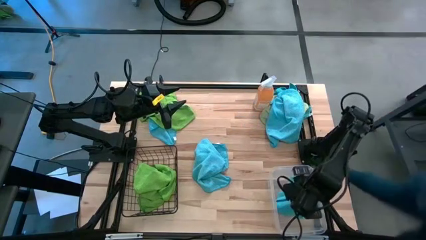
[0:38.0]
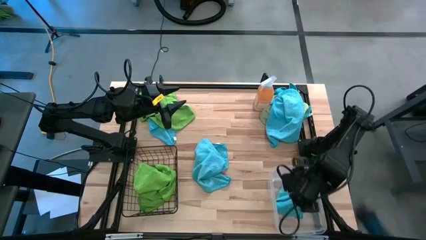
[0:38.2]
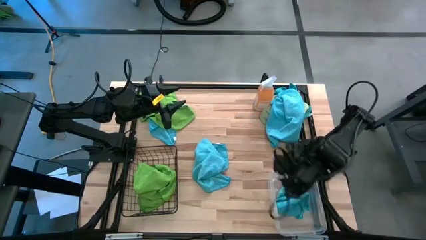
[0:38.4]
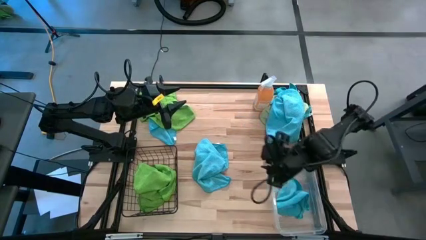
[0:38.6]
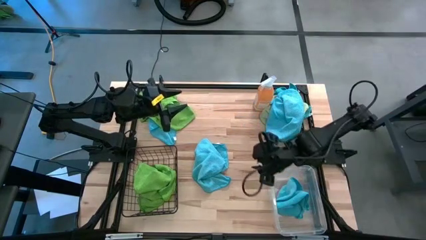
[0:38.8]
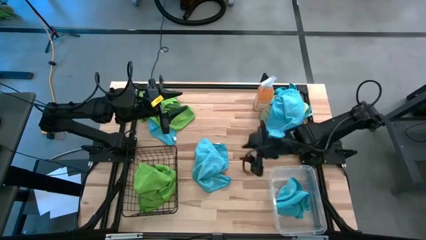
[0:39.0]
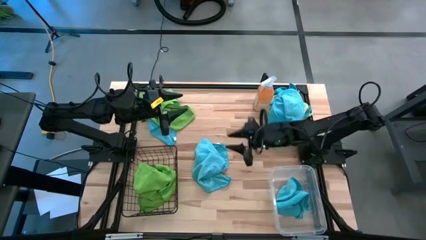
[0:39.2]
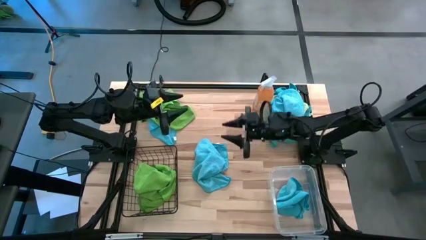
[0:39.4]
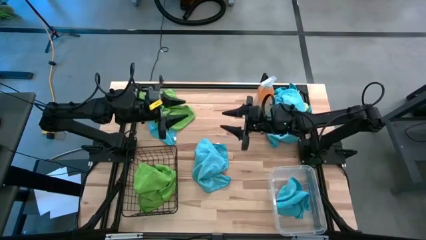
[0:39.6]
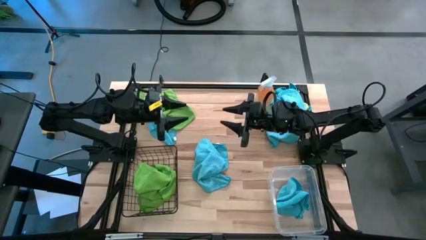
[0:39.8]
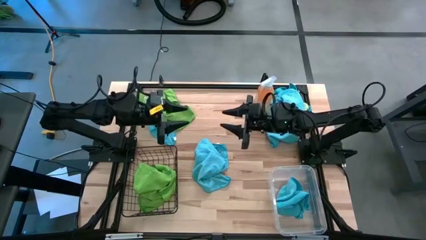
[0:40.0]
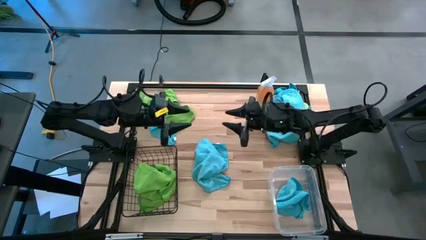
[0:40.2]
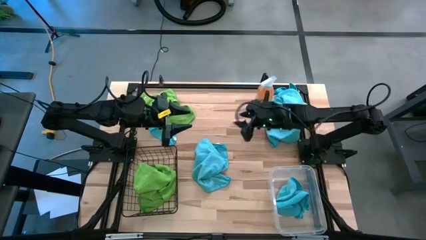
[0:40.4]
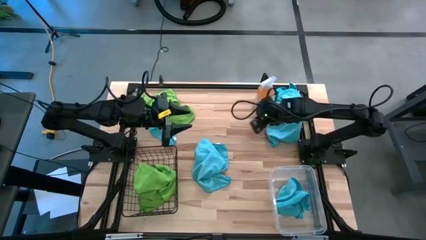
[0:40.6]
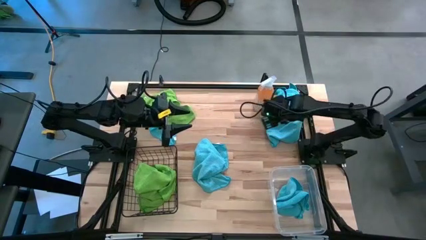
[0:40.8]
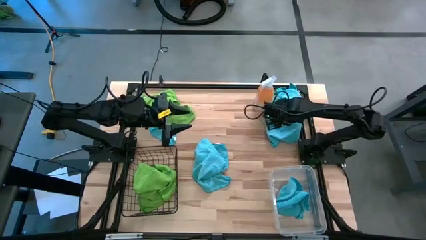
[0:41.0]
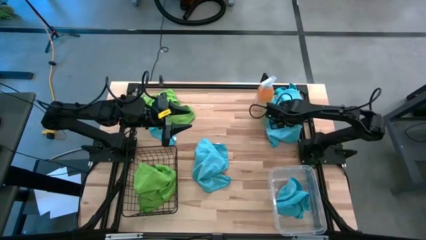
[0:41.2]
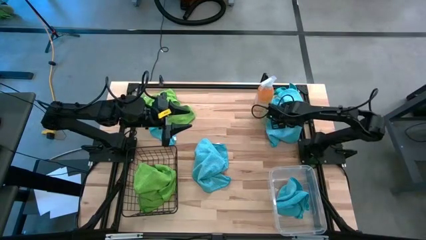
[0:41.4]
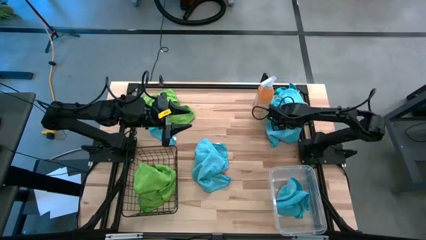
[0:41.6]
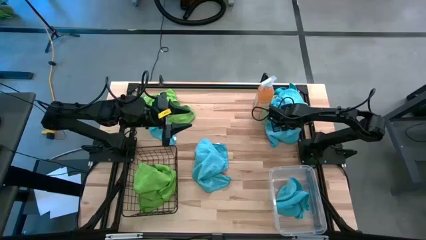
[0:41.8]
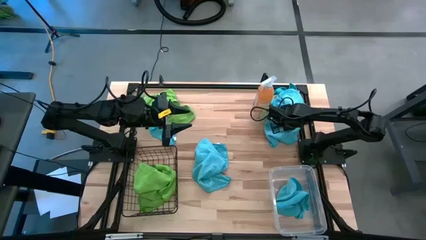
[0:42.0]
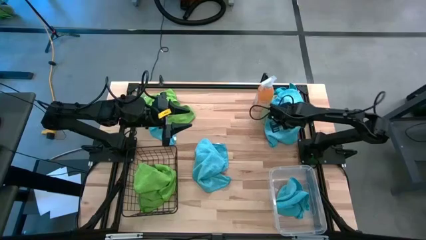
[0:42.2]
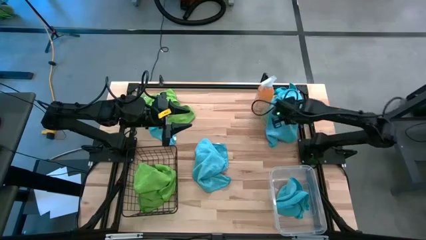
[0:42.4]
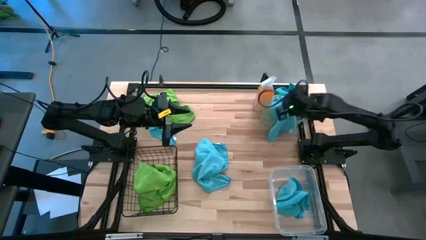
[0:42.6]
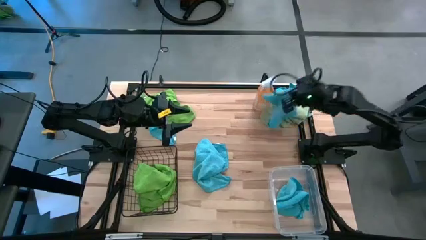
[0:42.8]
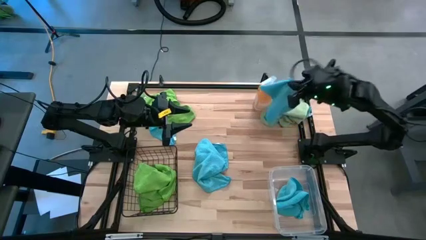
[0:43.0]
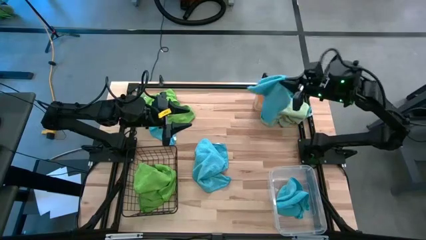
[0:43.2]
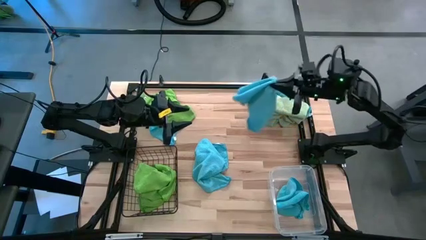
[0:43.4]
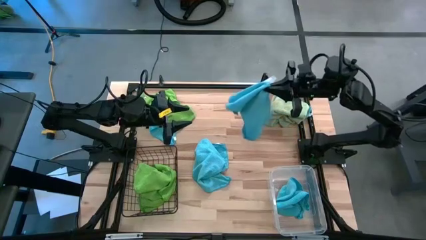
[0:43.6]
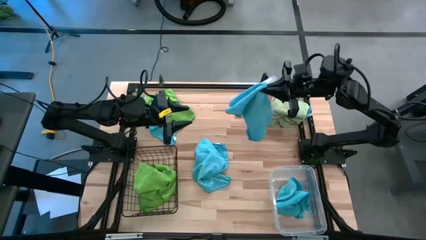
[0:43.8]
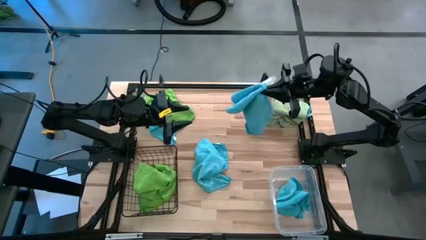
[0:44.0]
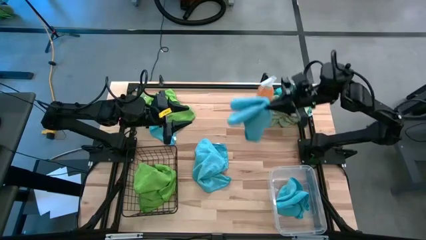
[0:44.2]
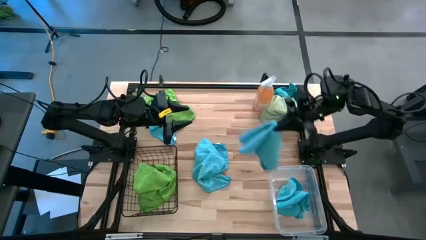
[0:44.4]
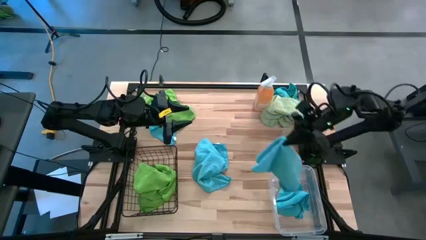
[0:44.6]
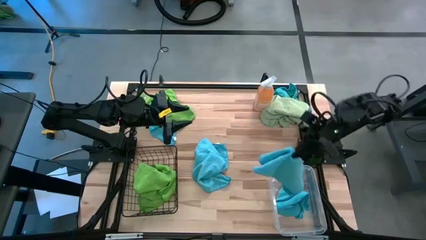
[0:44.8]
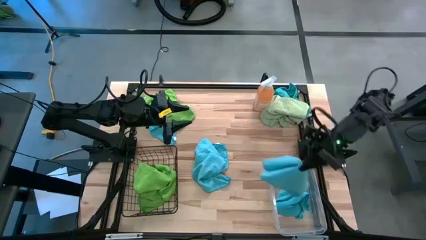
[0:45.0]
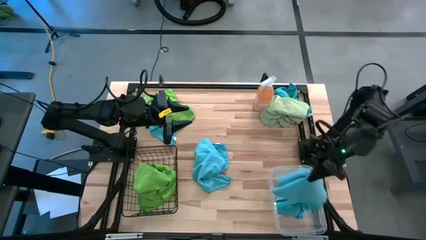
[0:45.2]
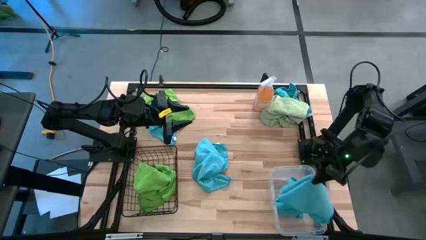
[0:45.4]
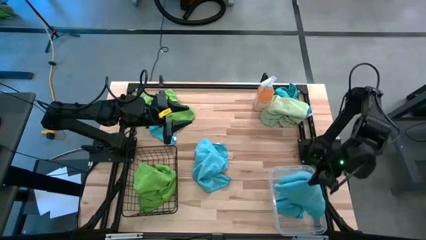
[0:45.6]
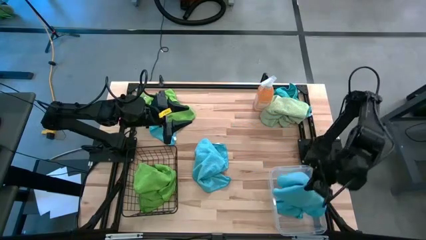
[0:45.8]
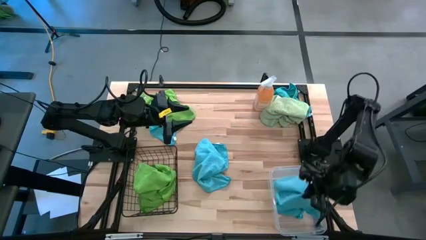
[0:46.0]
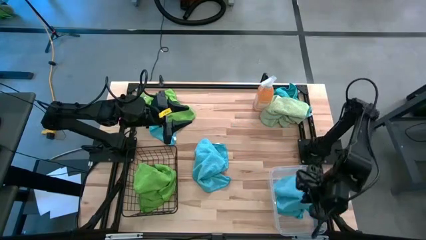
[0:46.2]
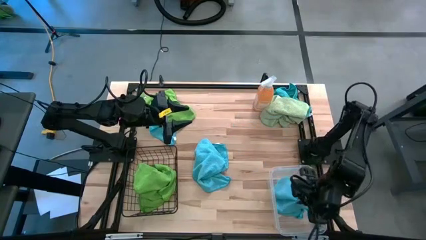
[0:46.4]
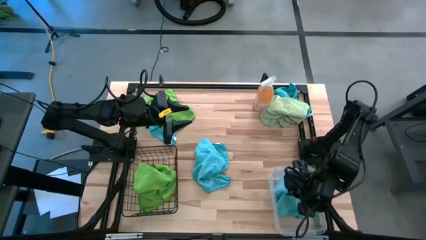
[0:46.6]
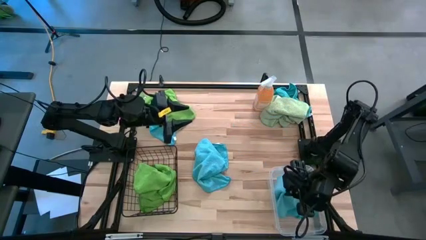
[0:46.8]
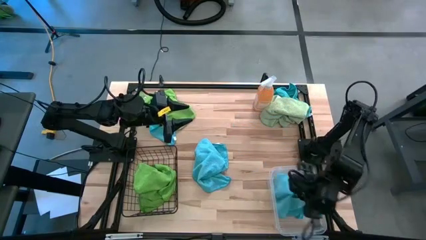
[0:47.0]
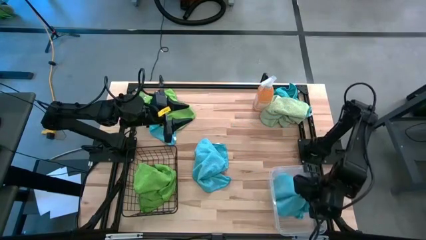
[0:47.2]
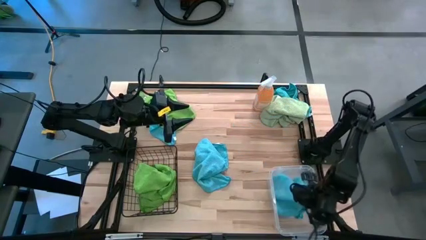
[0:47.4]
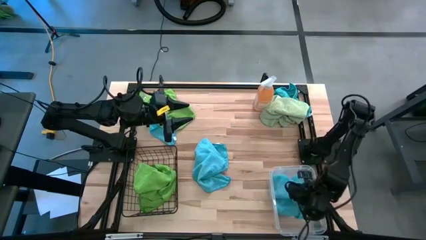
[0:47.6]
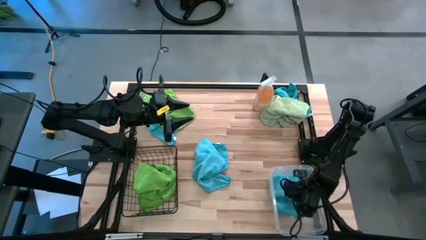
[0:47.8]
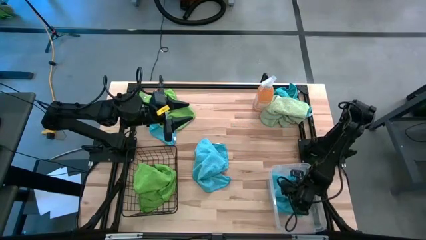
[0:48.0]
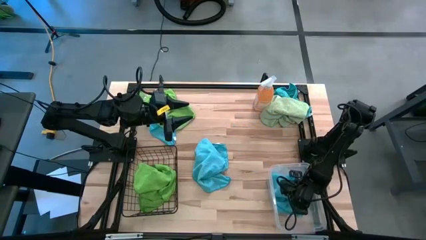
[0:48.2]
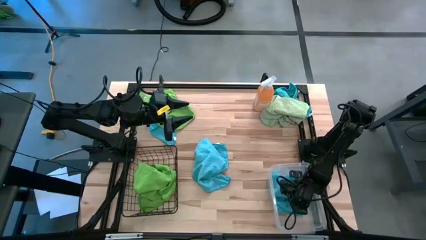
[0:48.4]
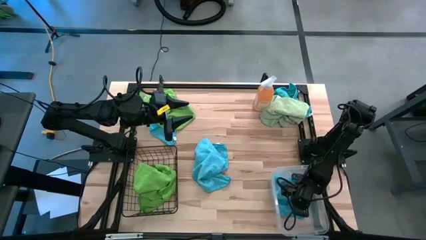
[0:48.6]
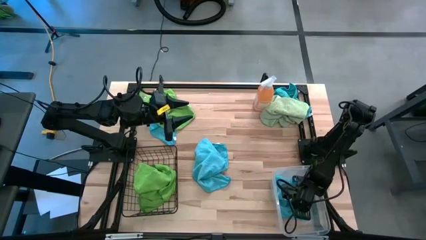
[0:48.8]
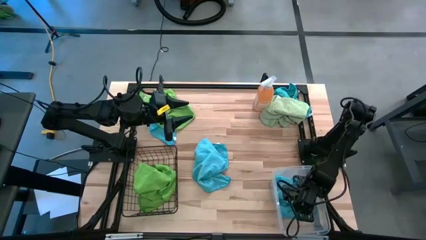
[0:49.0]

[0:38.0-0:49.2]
Task: Sort microfiber towel by color & place in baskets
Put the blue microfiber cloth into the transparent bin
